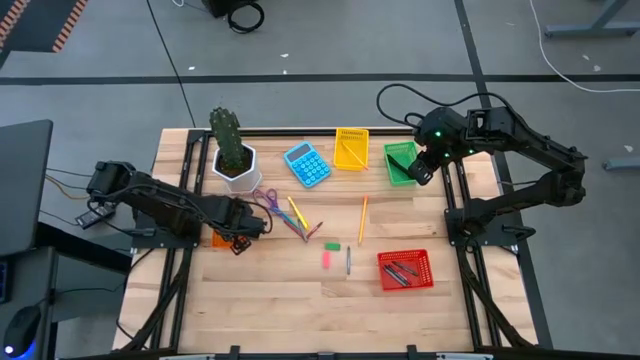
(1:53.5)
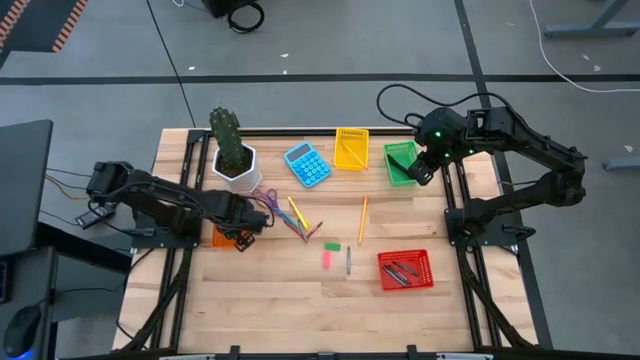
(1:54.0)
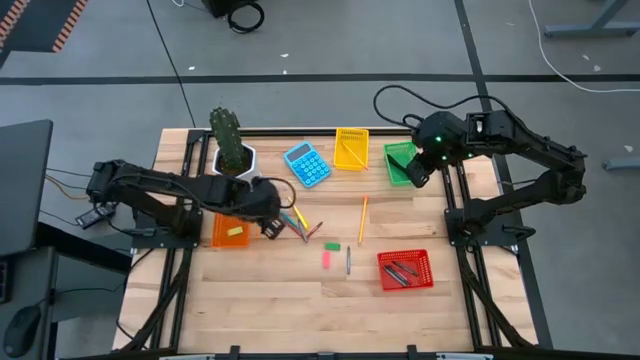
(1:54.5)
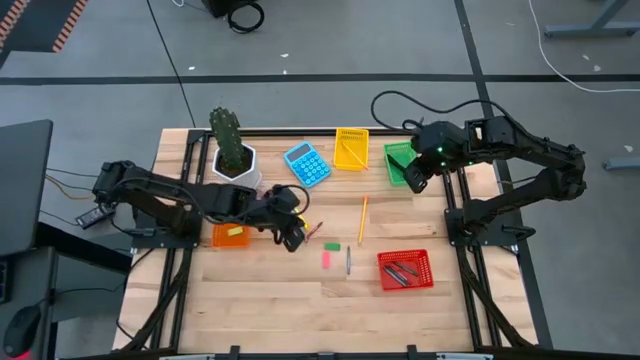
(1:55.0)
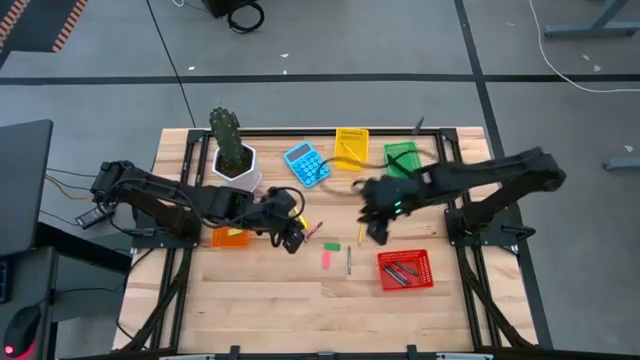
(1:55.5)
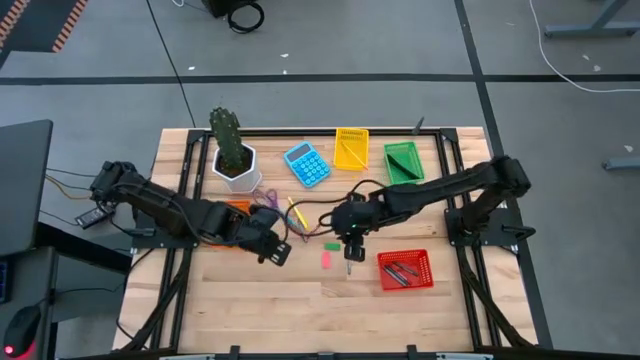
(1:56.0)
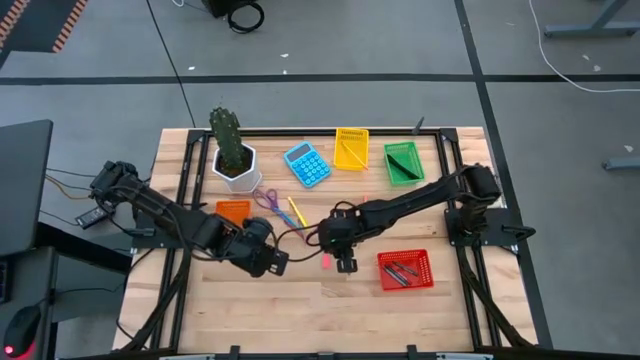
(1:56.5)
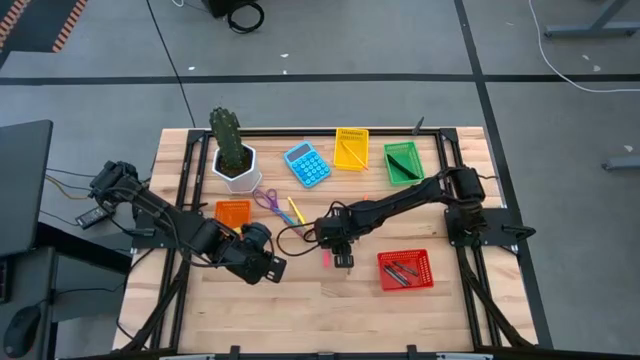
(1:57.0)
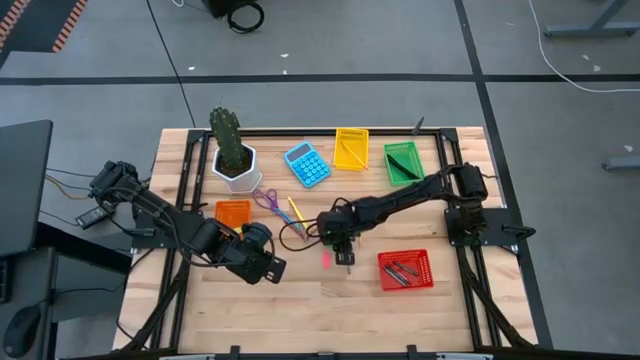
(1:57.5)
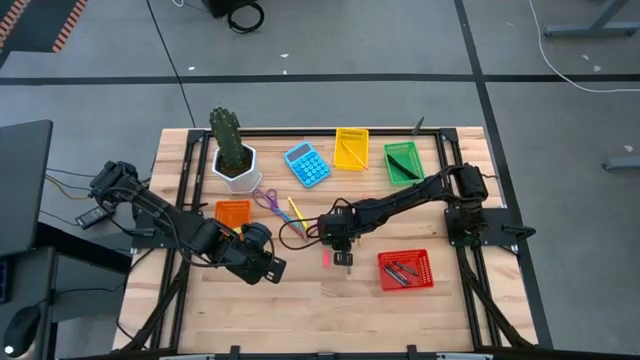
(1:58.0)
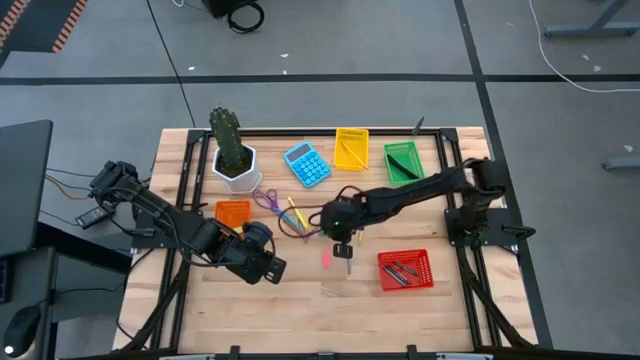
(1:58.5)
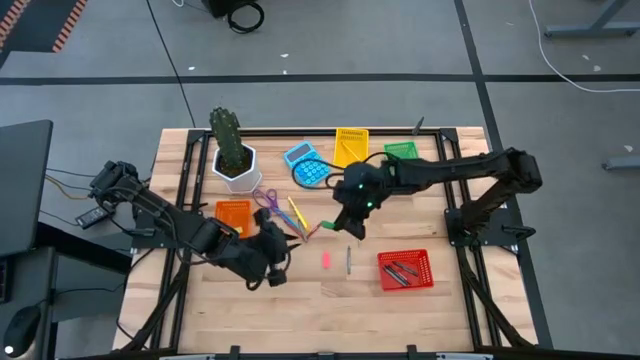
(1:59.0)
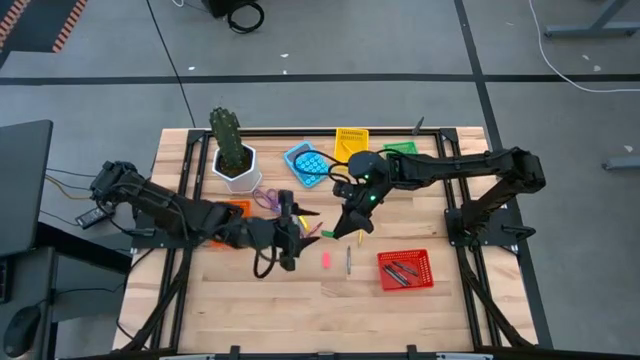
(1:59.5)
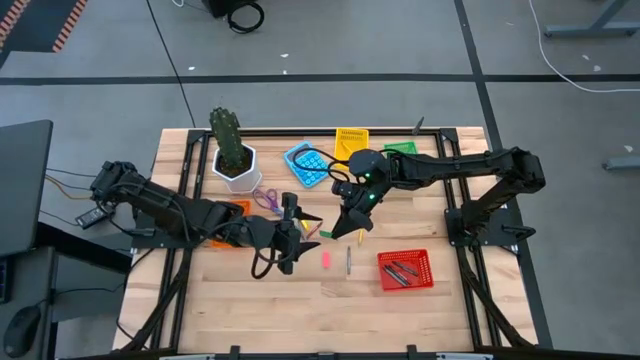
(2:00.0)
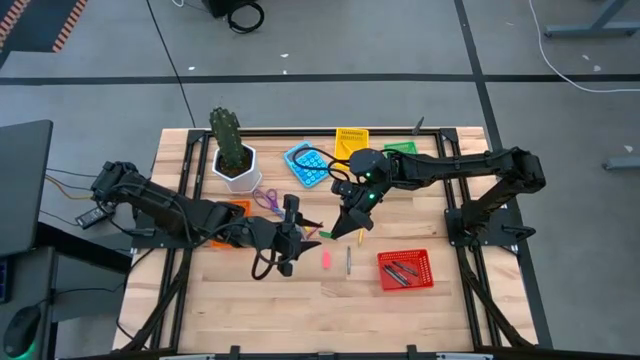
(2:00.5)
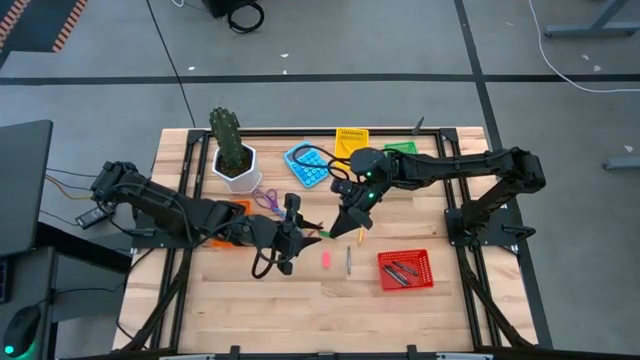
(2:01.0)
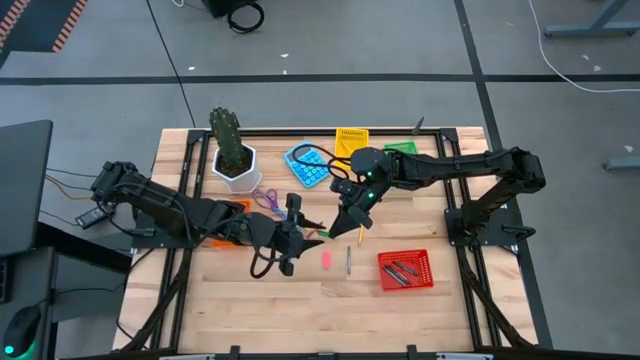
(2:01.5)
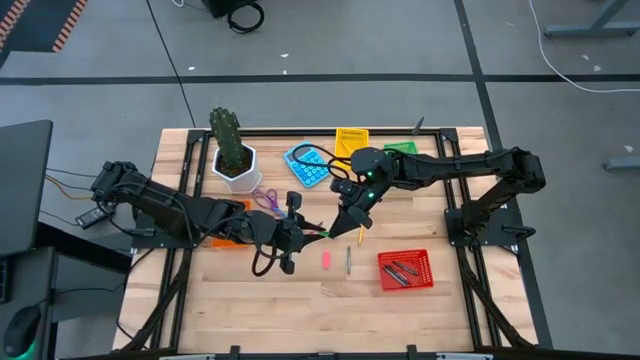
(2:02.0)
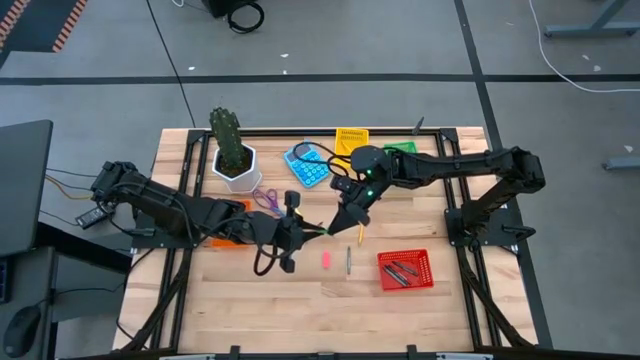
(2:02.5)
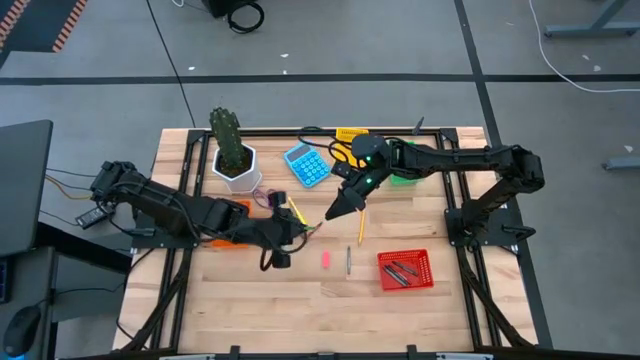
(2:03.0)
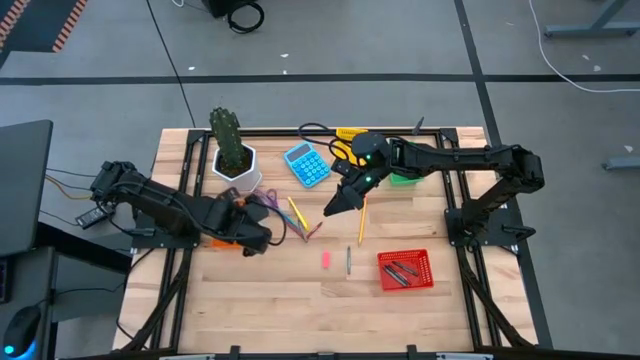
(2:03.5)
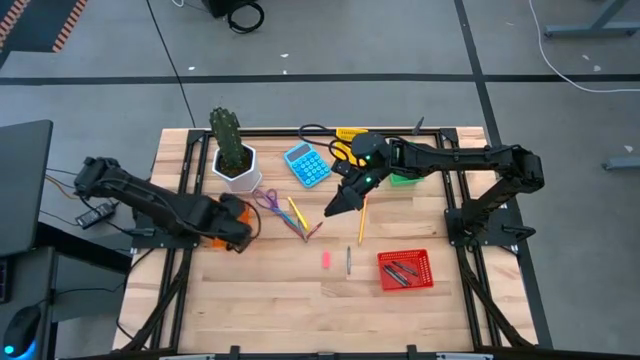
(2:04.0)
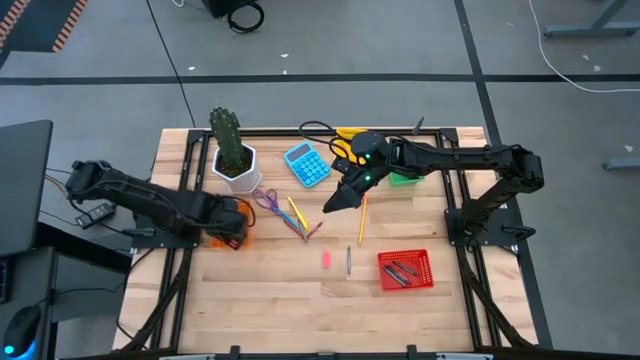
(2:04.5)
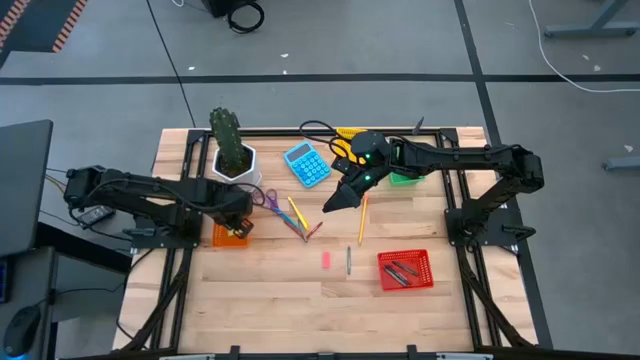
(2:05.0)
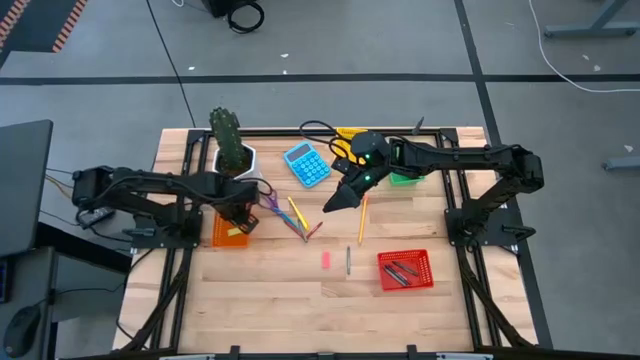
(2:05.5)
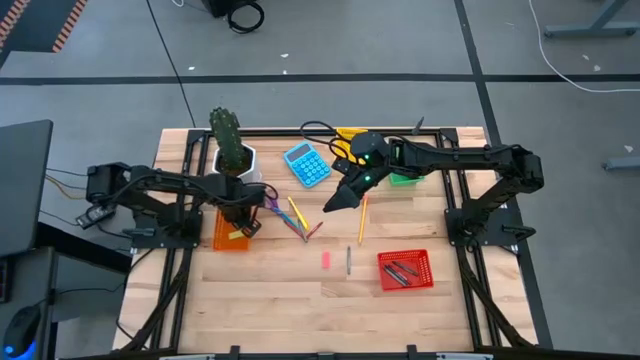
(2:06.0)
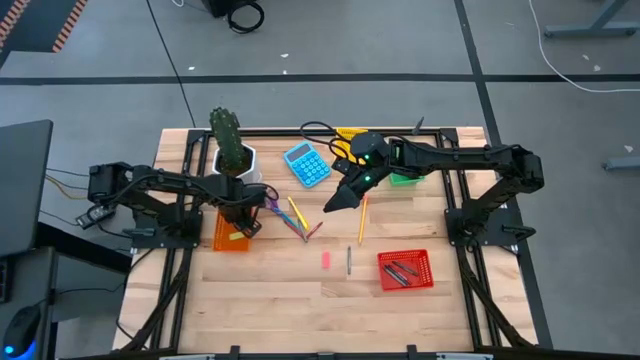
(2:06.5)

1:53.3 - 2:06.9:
Task: Sort crayons/erasers/pens/pencils in bins
Put the green eraser into the orange bin

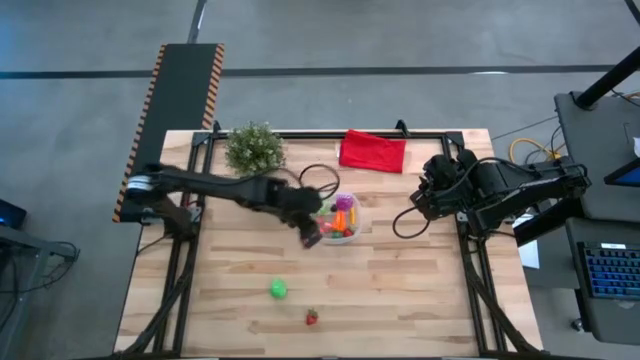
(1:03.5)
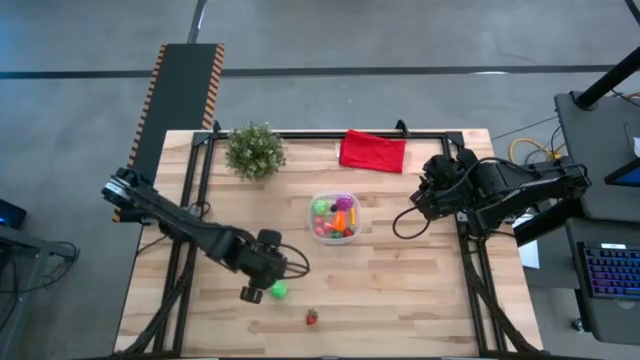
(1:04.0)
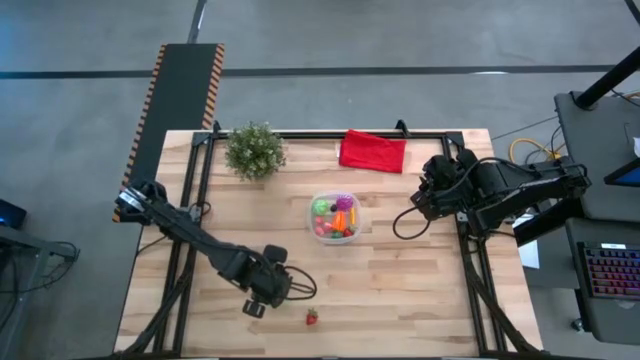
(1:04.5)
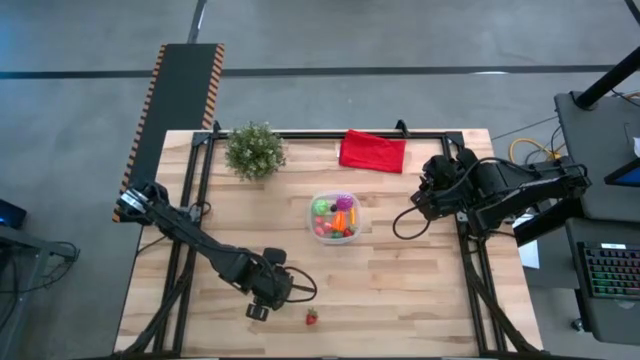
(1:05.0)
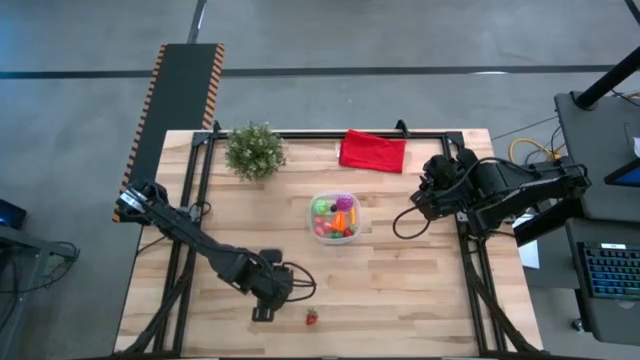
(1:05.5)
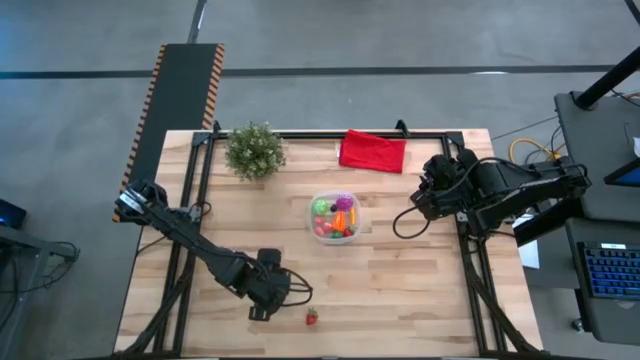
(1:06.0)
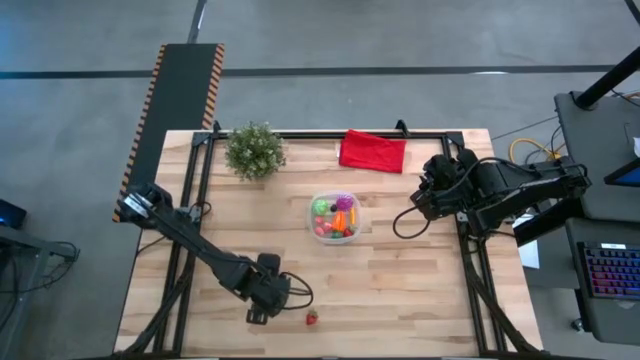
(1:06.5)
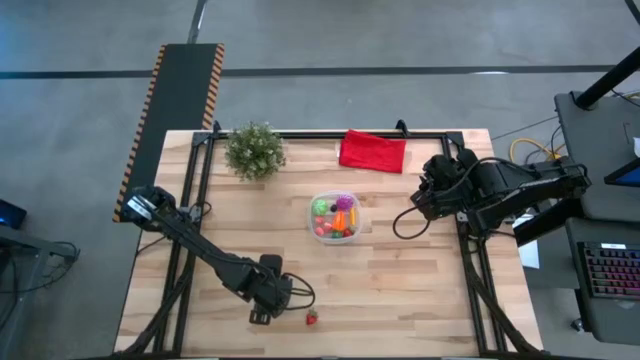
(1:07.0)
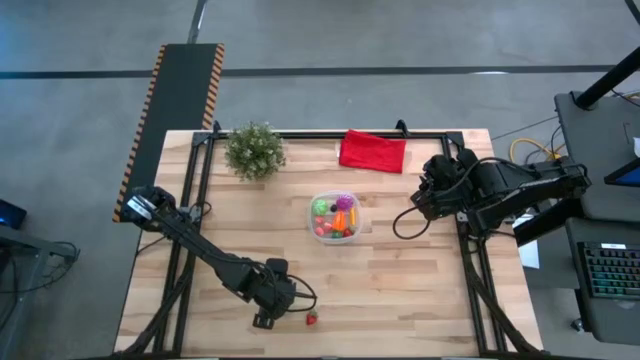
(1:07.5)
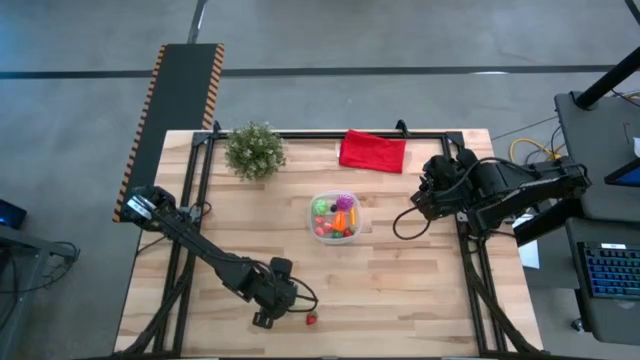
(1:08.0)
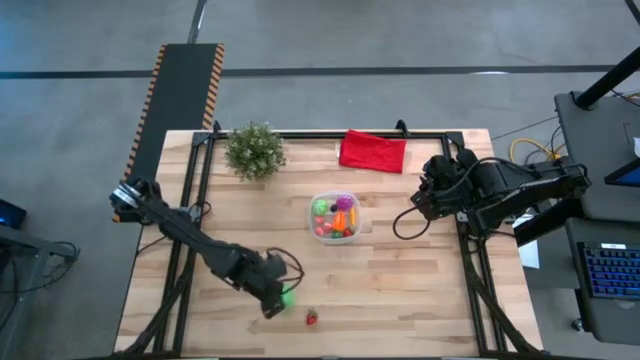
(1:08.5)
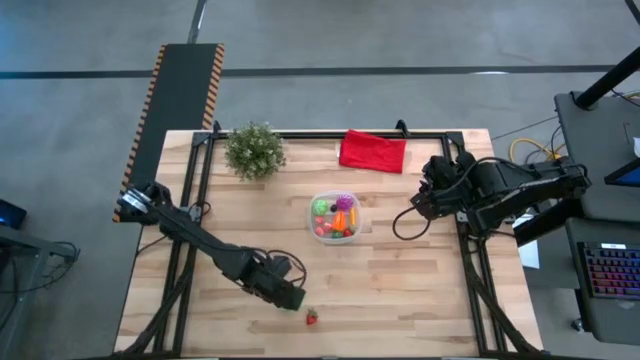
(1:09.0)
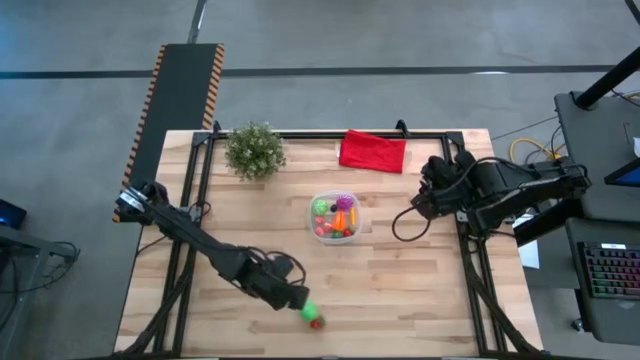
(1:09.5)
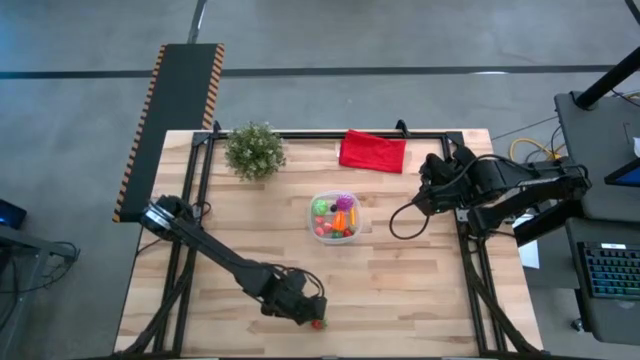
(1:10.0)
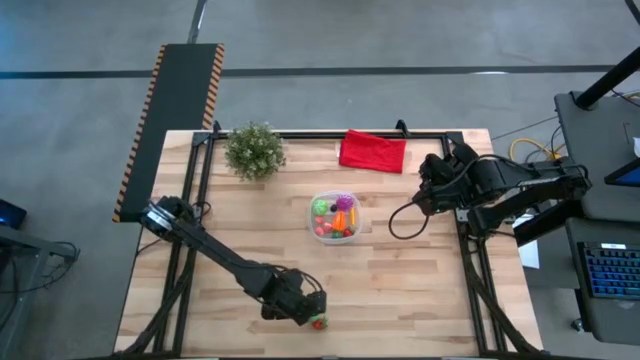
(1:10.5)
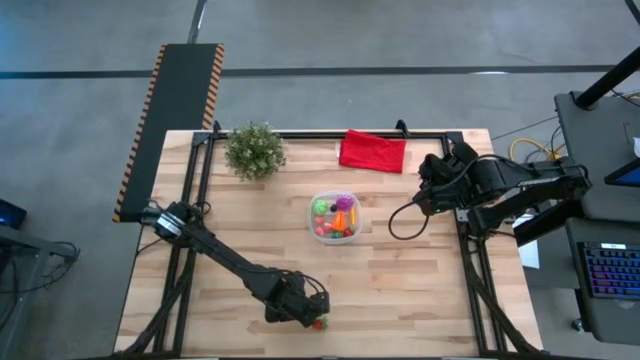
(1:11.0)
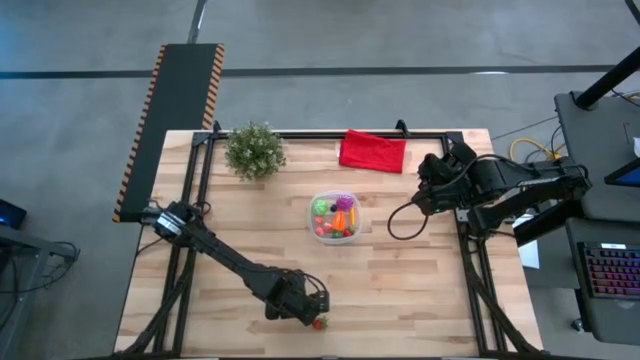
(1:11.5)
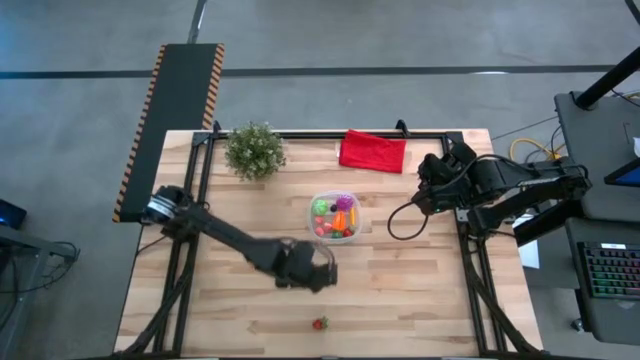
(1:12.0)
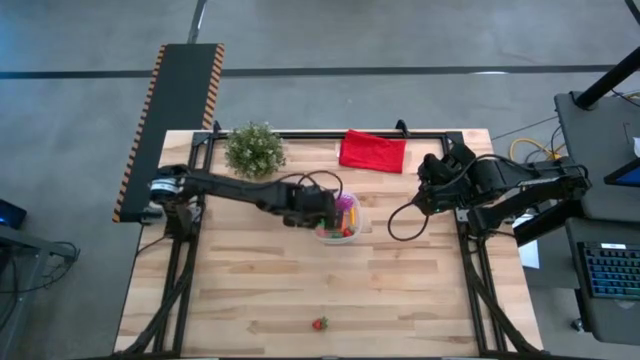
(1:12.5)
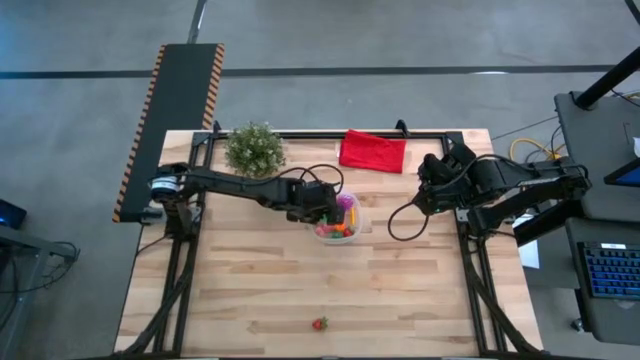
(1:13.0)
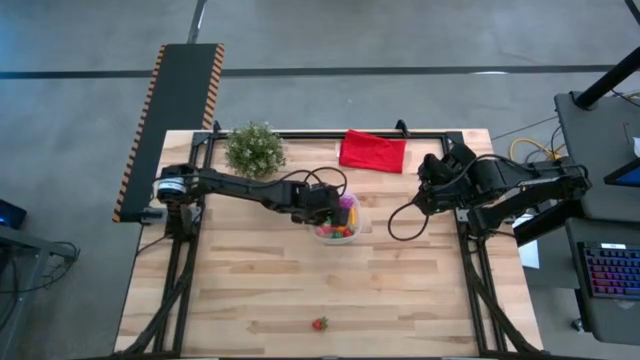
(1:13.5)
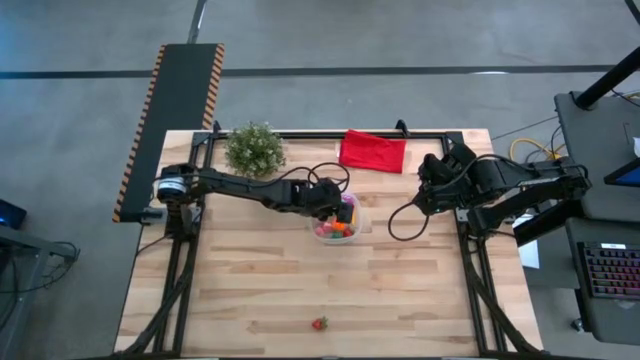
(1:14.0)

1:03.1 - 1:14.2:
Task: Pick and placing Produce into tupperware
Put the green pear into the transparent container
